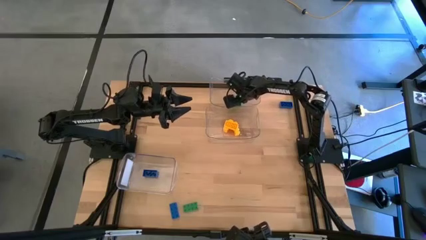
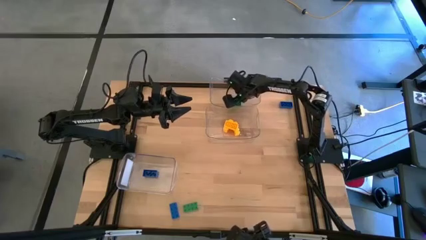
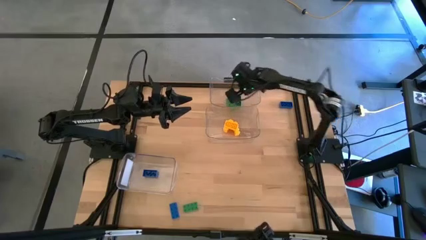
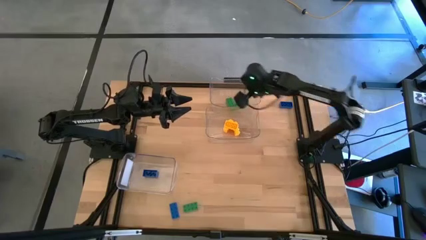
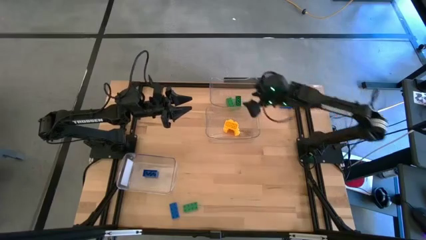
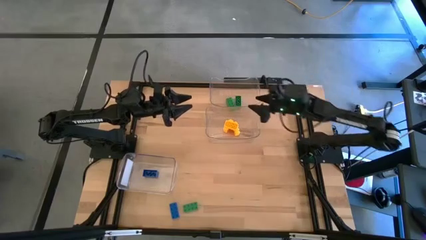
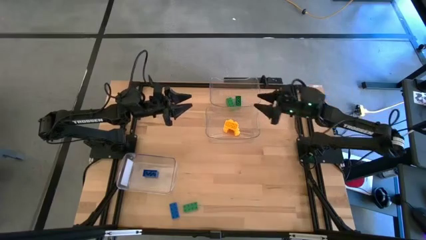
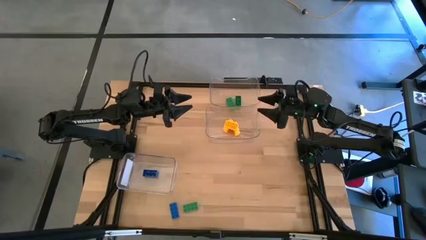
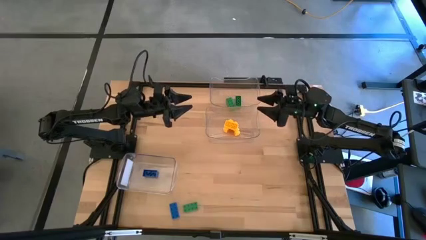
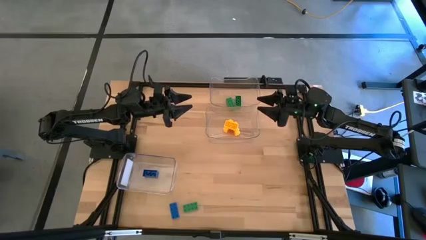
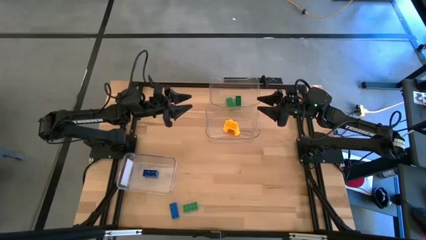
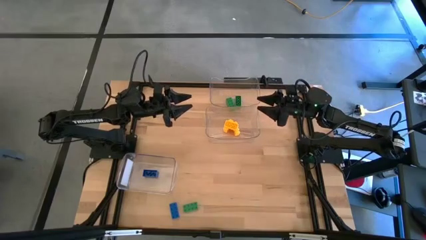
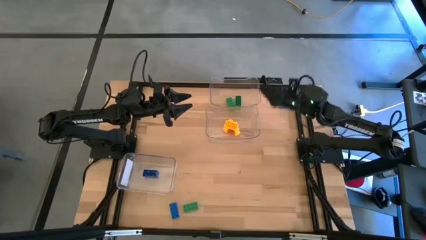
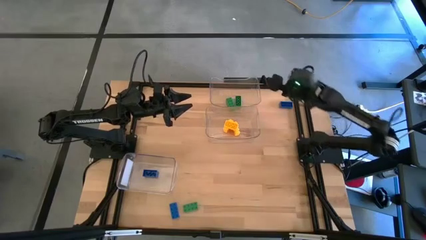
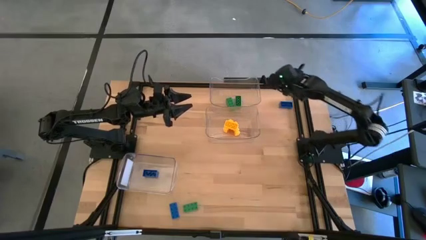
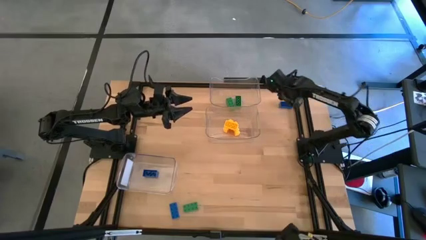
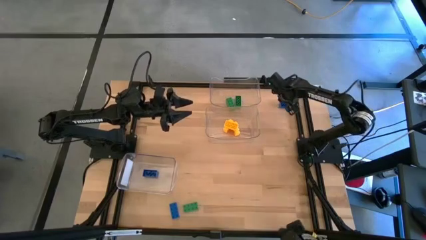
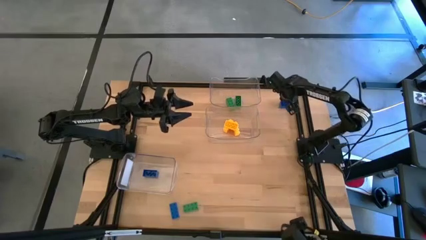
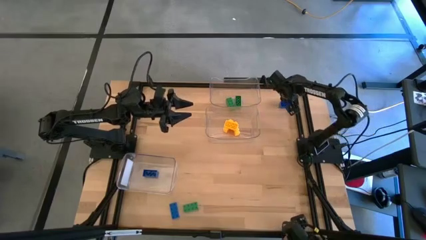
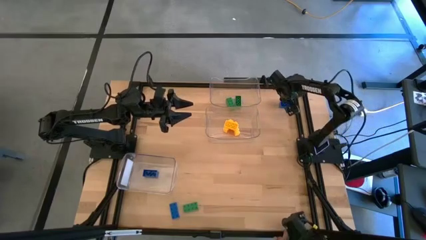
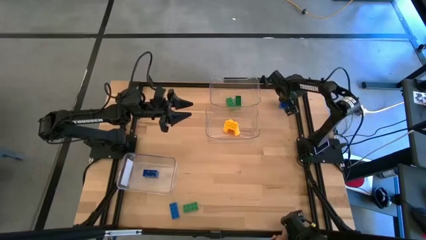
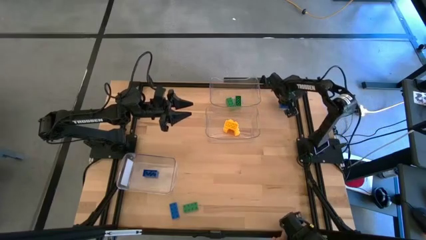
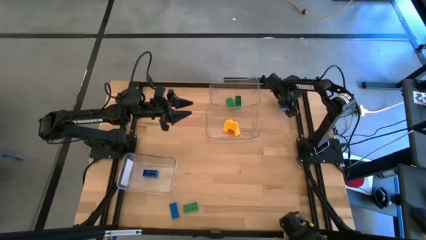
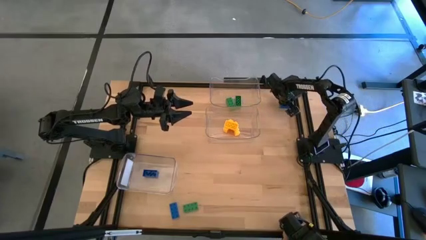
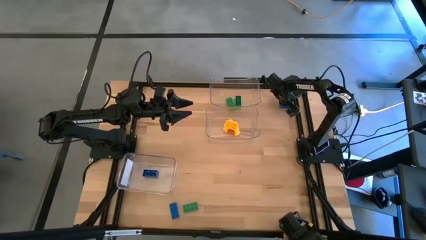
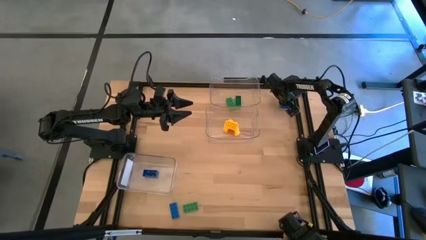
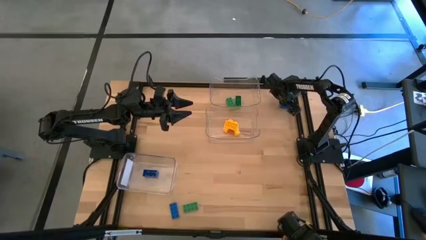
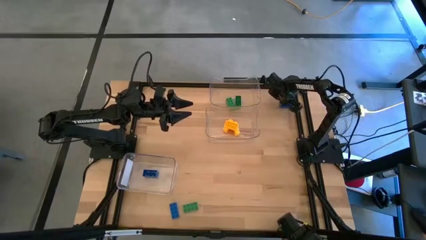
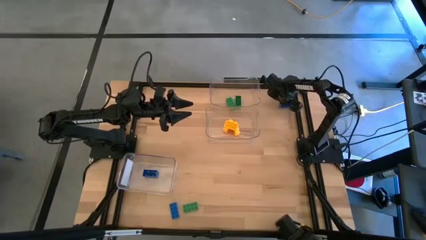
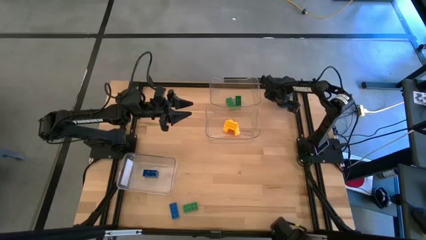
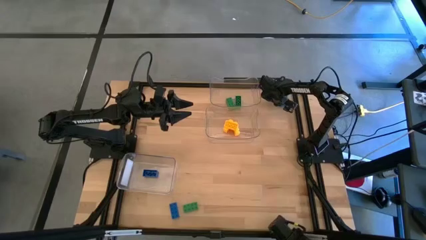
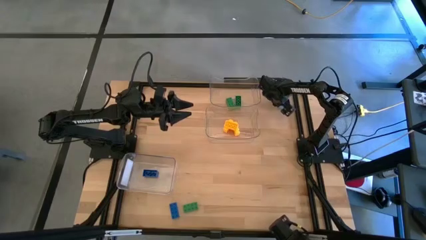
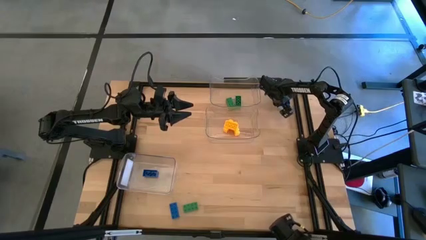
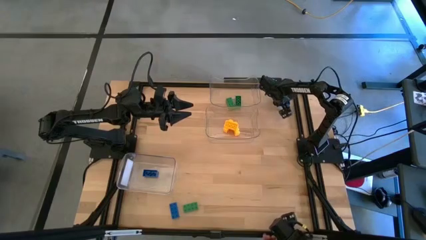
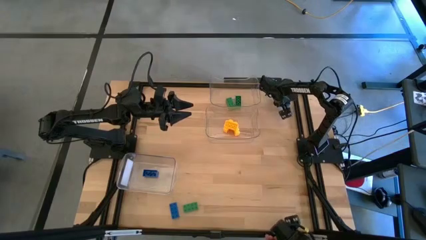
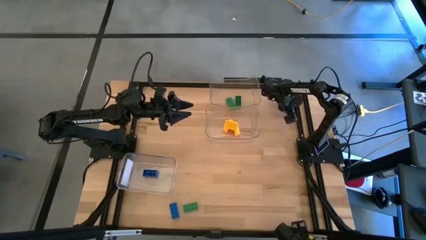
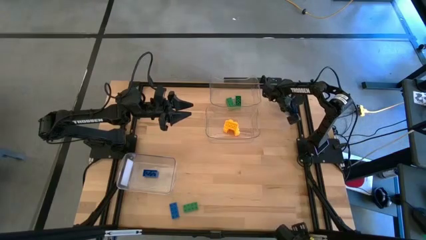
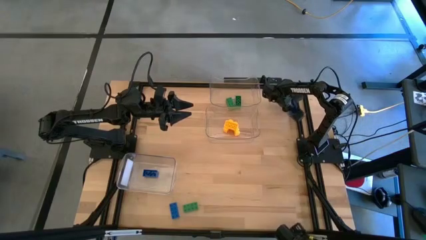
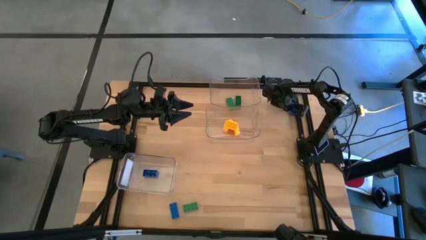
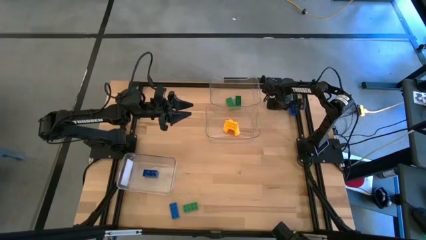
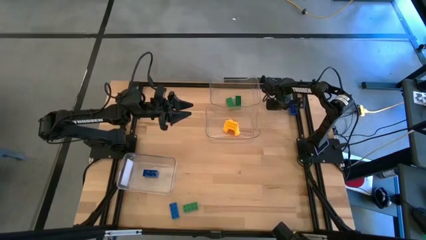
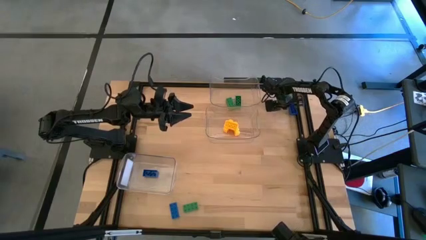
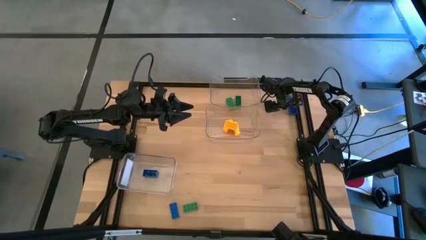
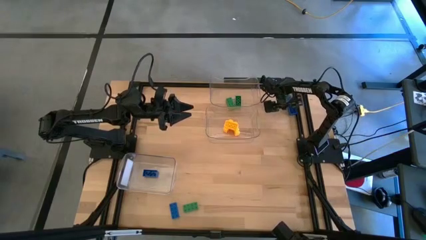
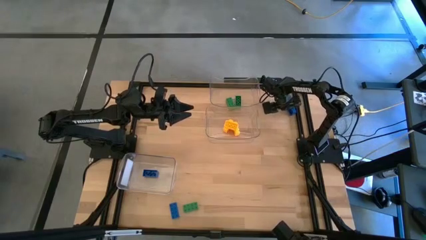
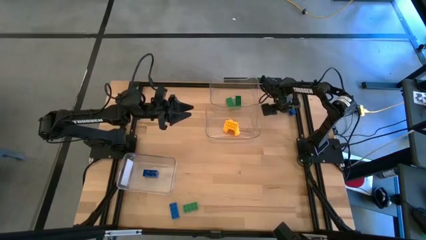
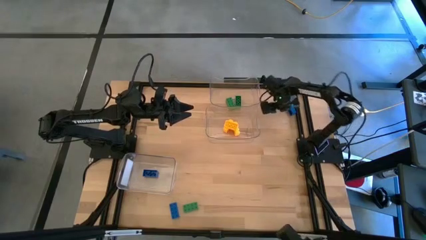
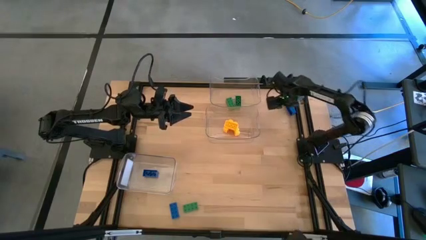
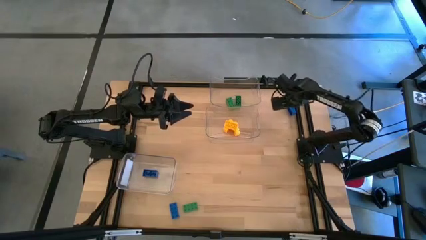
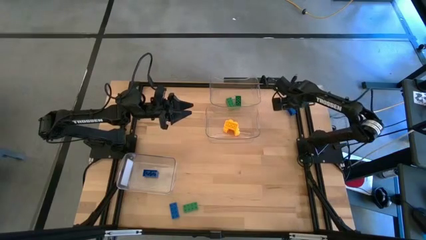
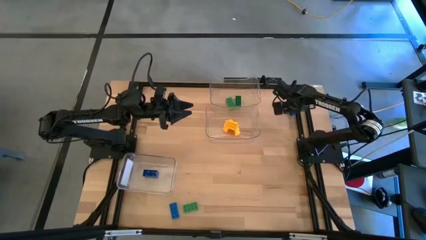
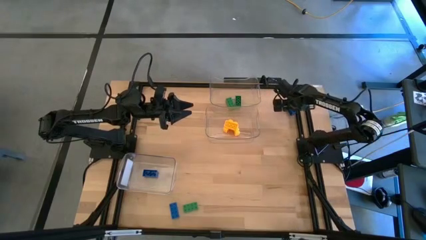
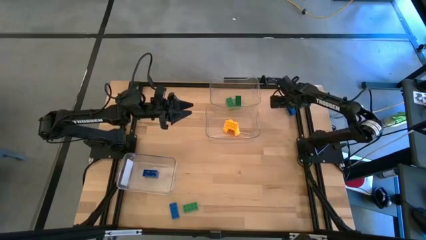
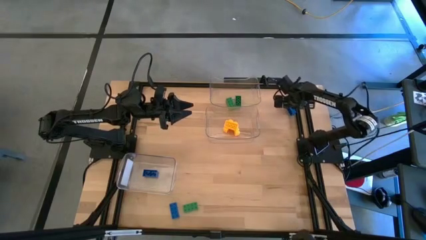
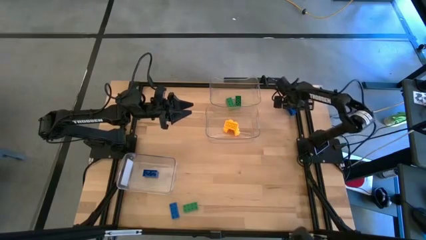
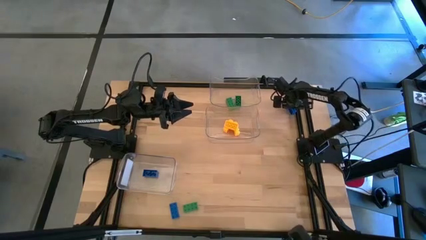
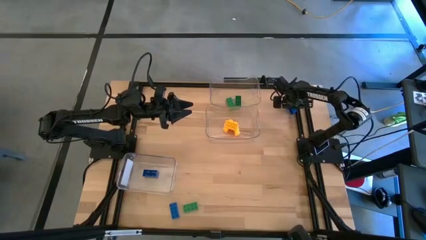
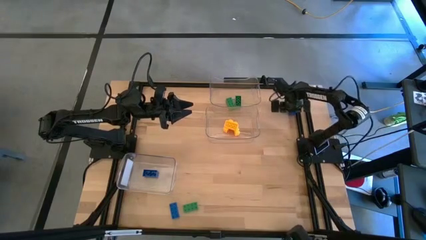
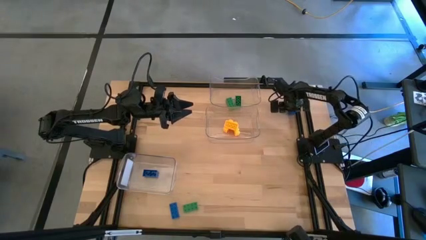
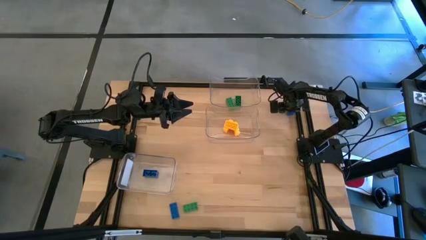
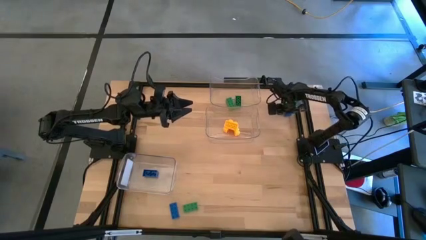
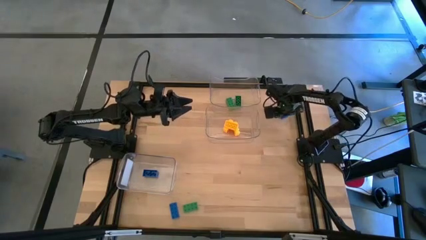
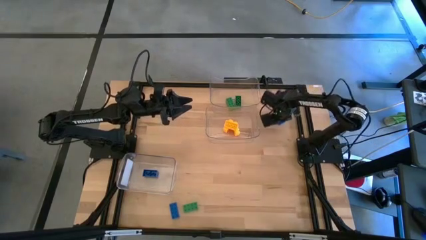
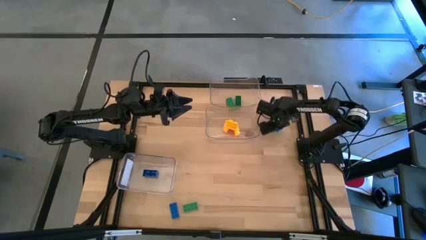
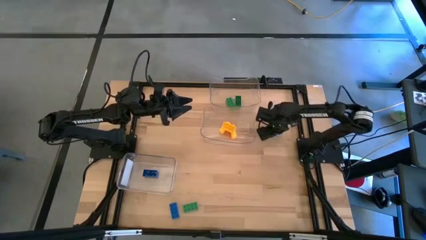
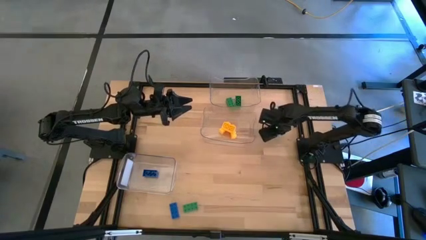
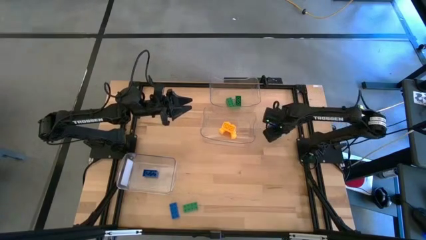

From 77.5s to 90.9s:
Task: Sort & place blocks by color
Put the top blue game piece into the bottom bottom transparent bin
